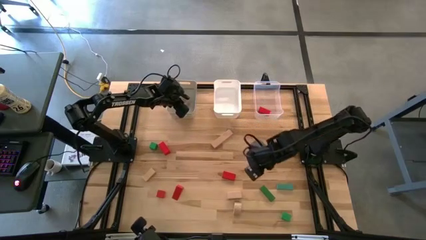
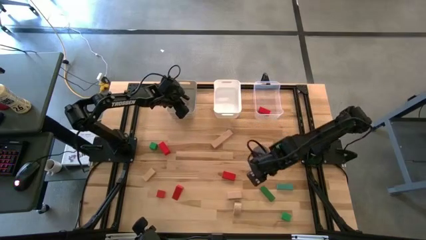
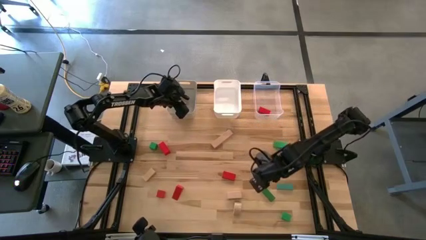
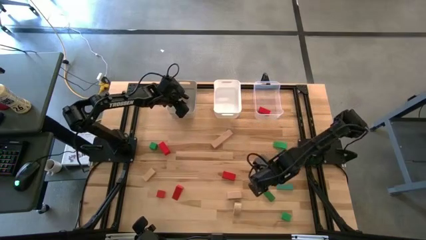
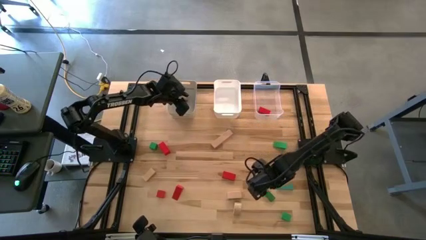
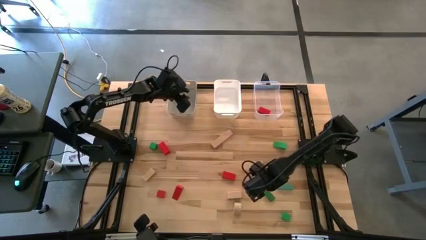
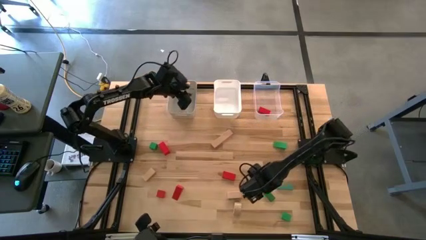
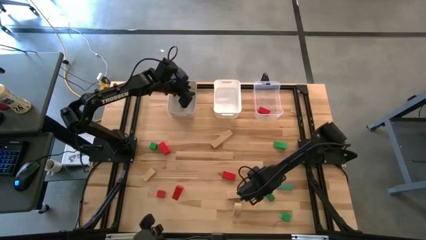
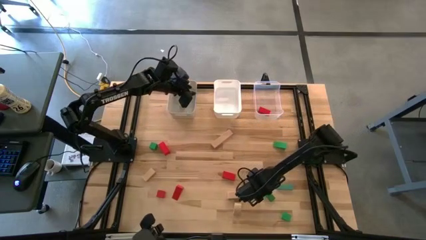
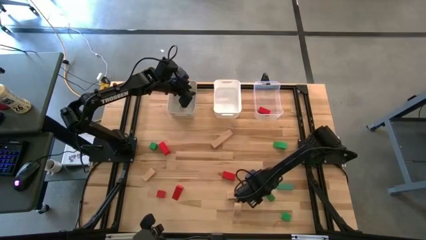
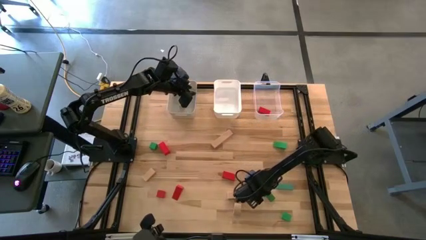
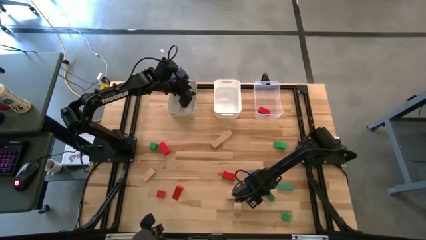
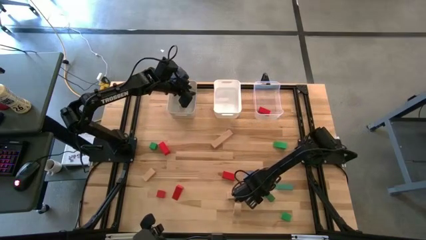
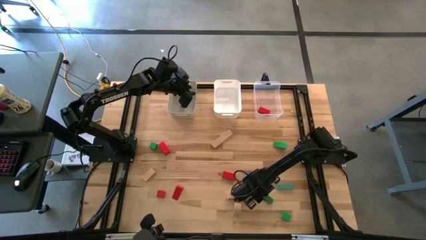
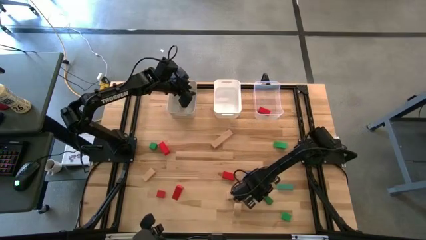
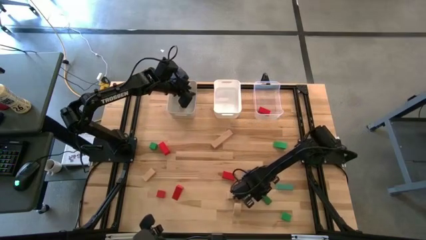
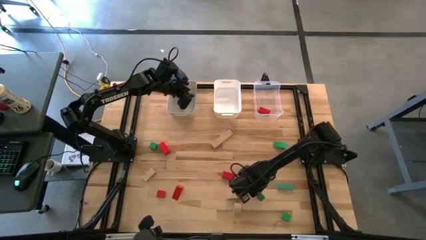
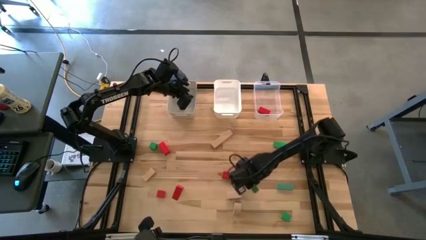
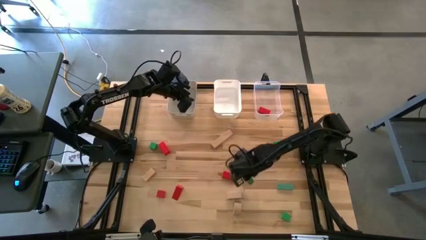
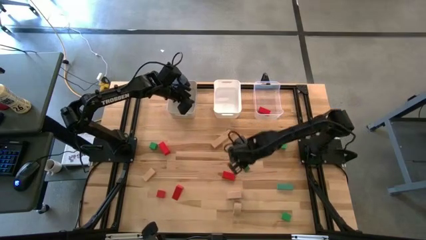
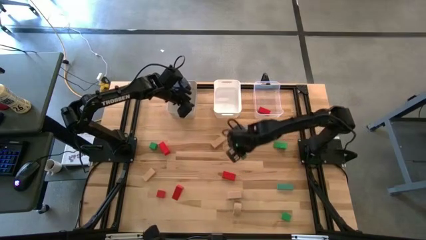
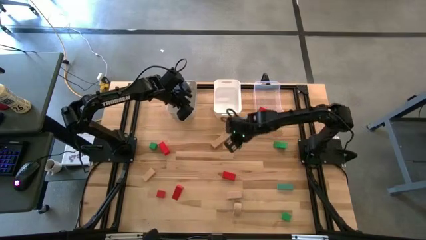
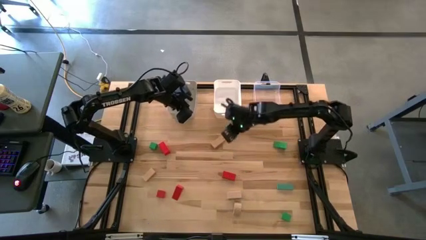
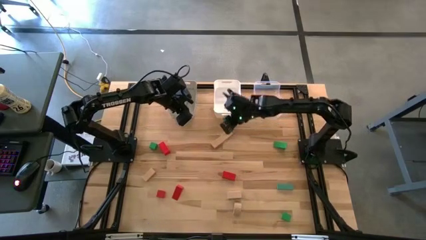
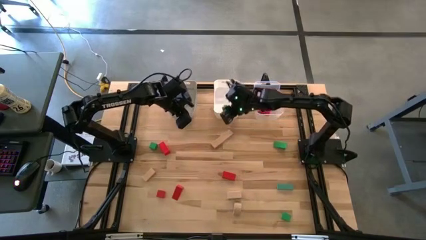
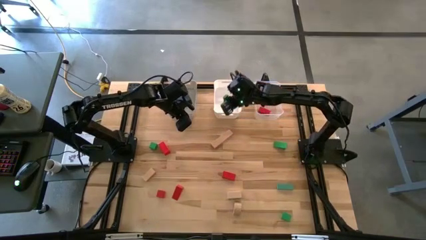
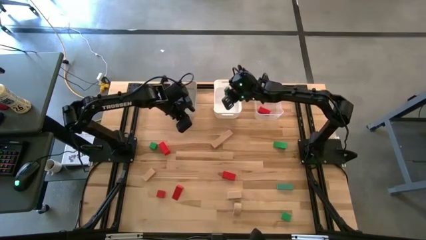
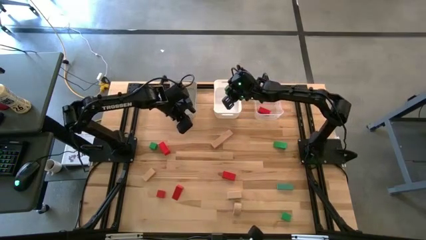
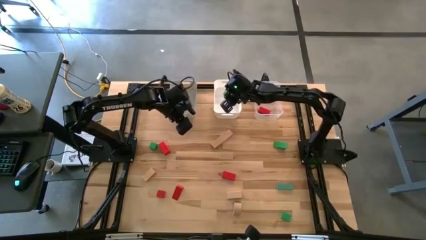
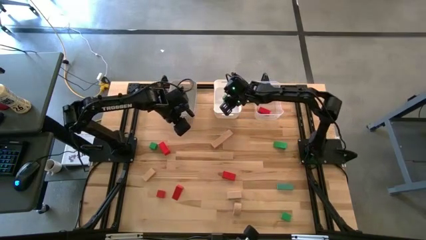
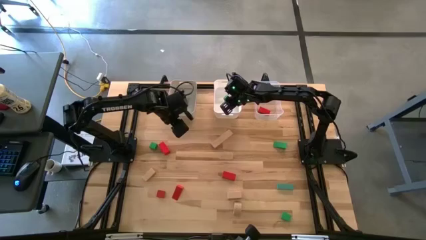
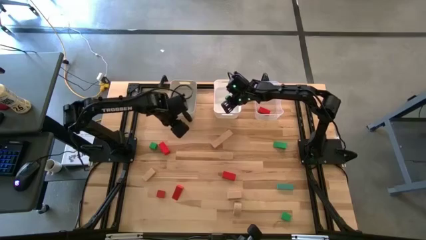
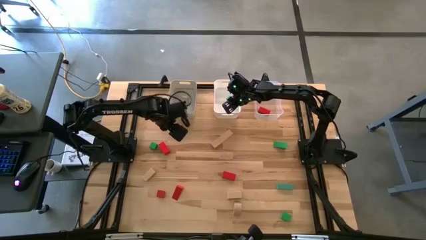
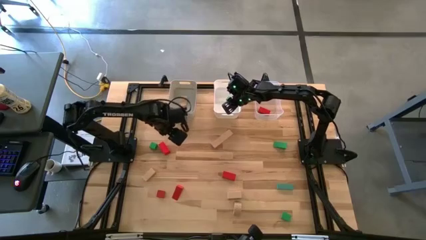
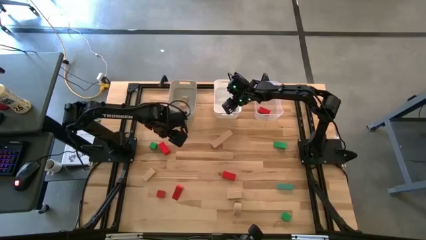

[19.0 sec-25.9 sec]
Task: Sort & place blocks by color
Put the green block into the white bin

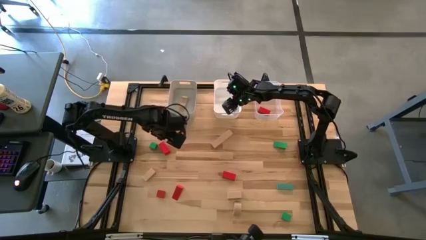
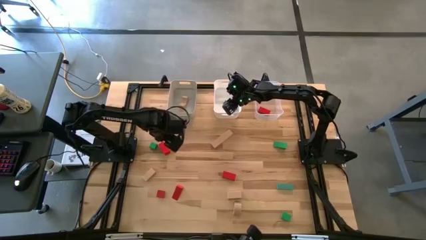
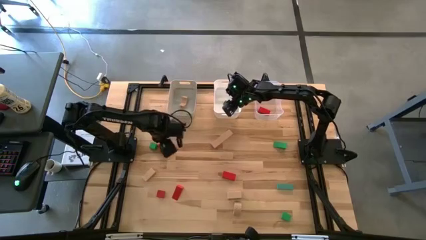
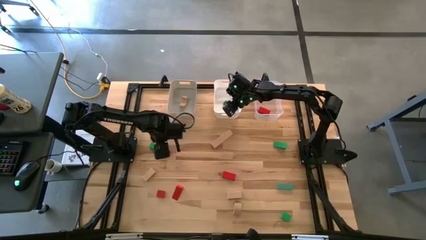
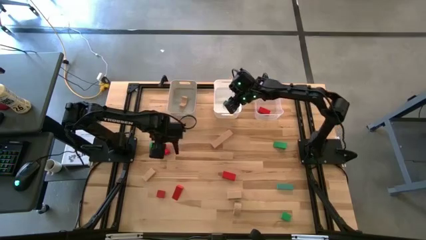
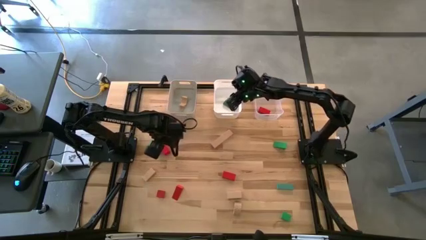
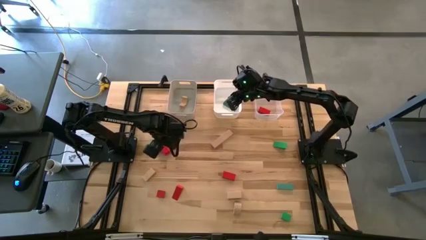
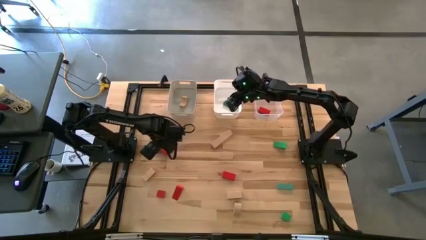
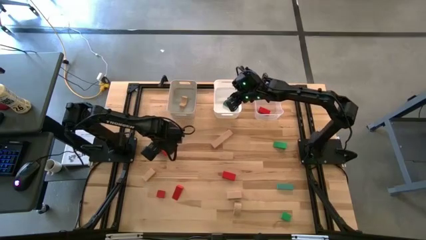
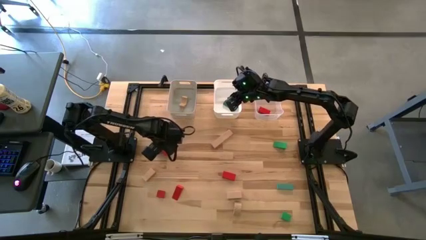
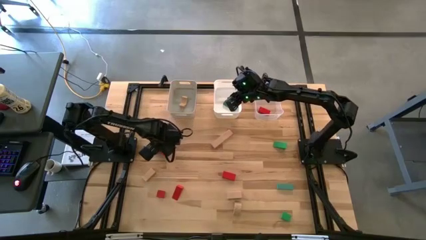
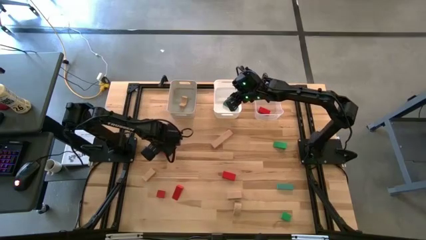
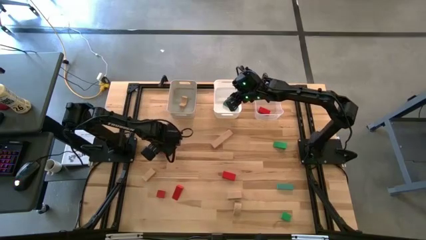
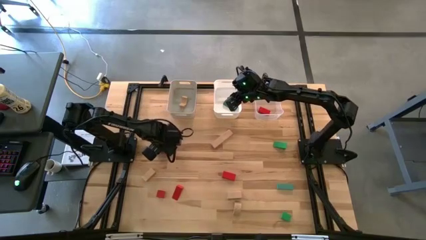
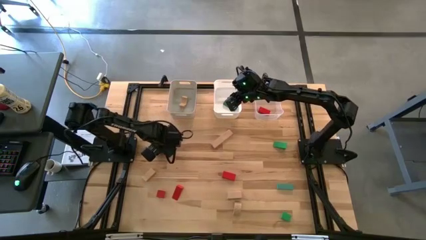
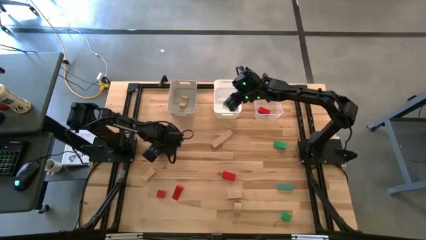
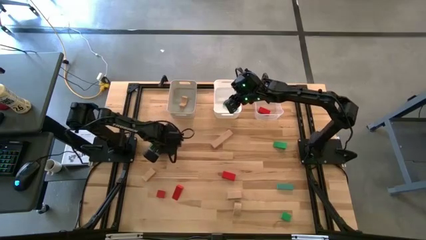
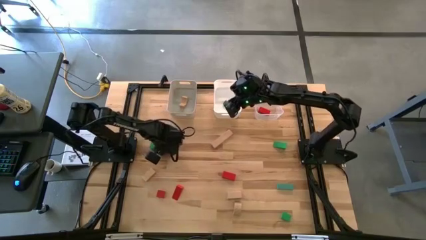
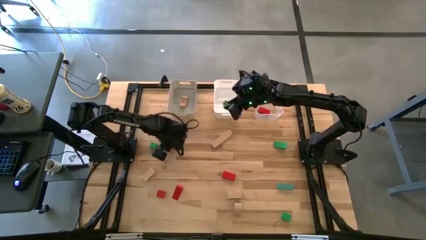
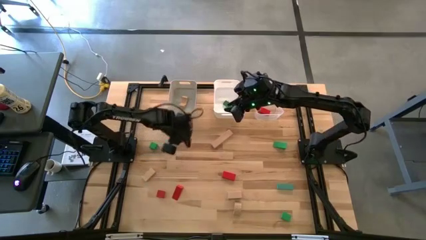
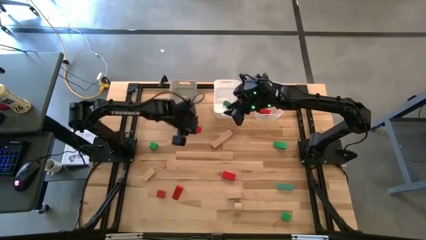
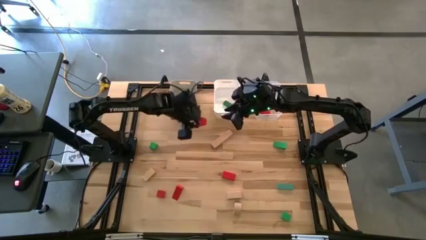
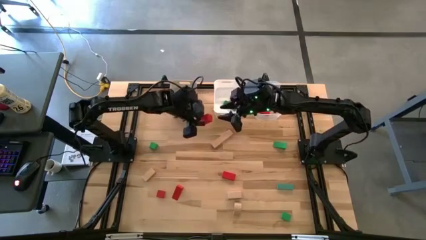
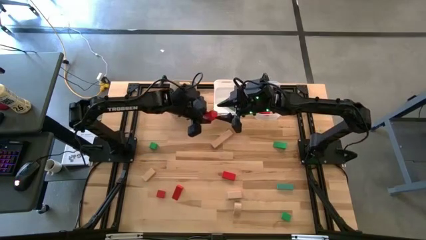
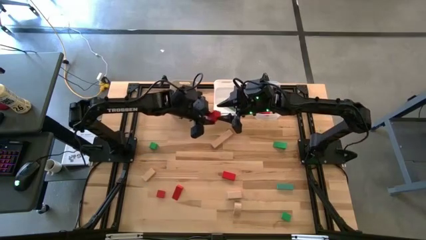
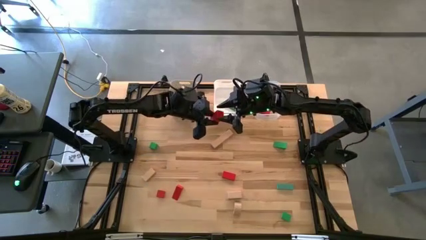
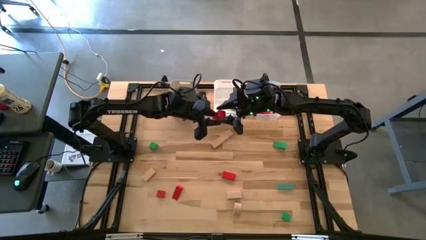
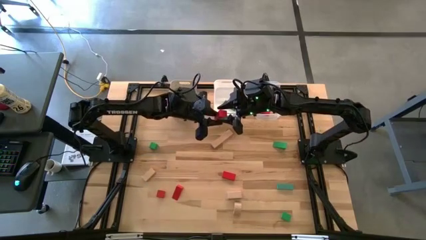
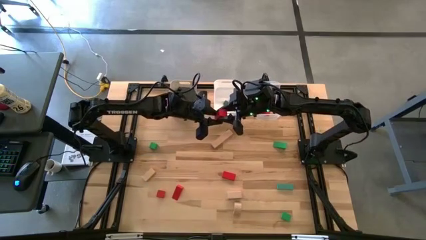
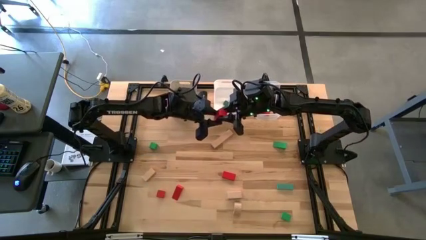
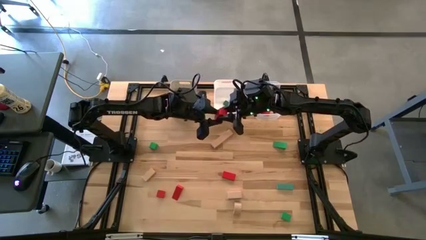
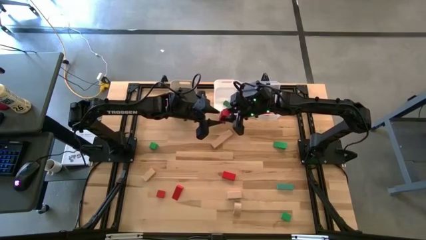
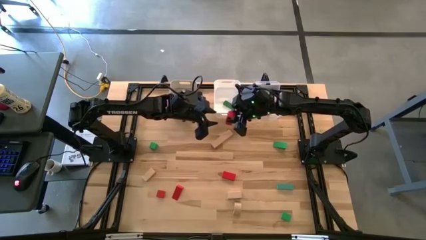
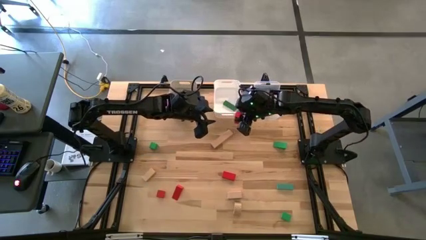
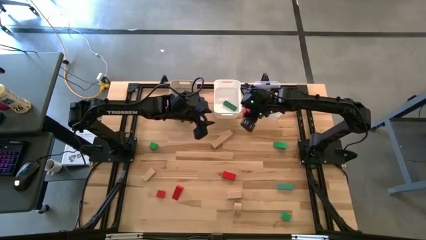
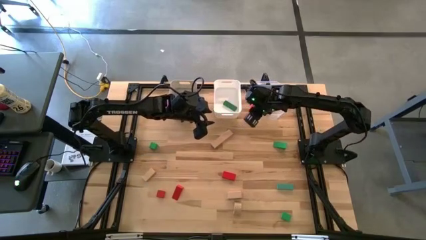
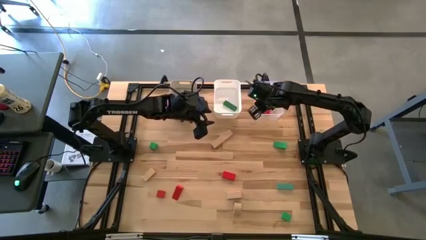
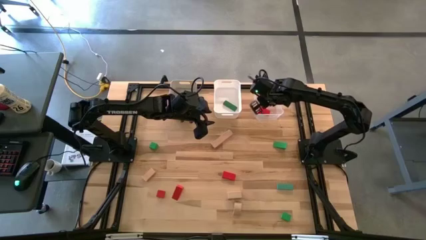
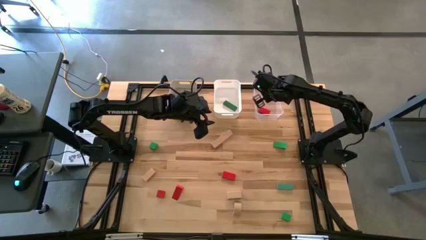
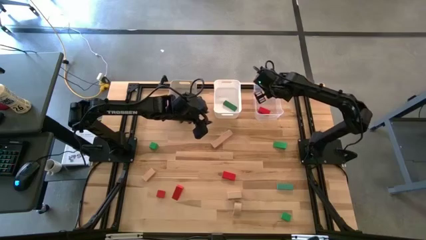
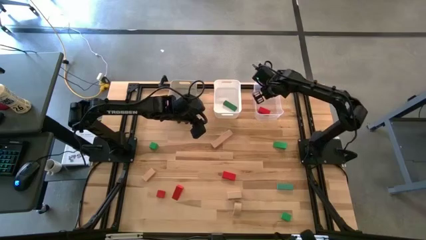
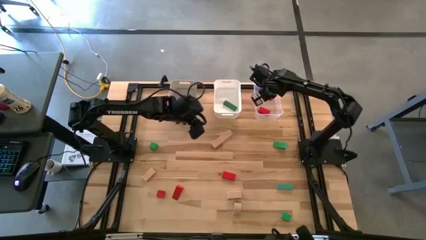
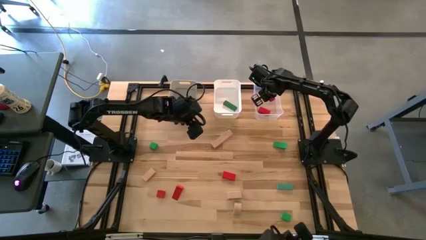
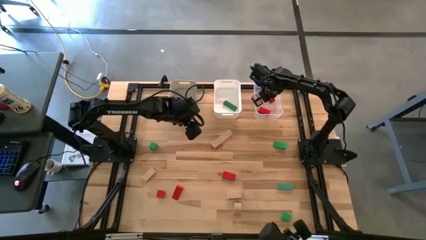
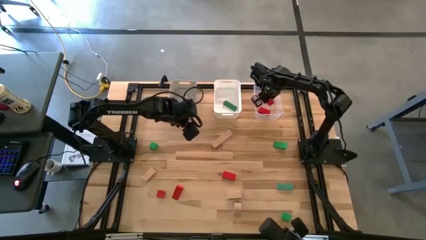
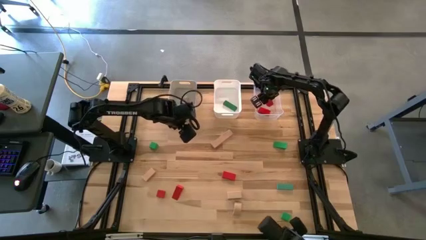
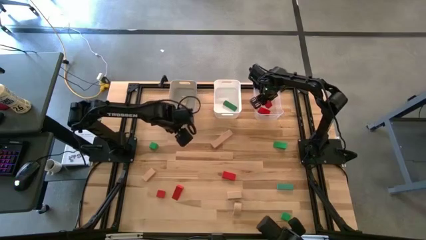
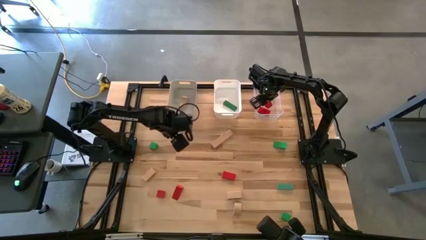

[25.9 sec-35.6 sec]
Put the red block into the transparent bin
